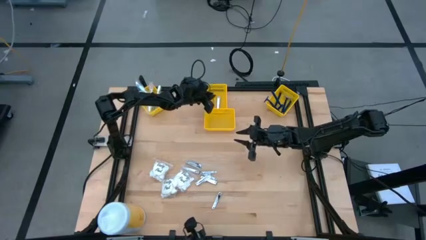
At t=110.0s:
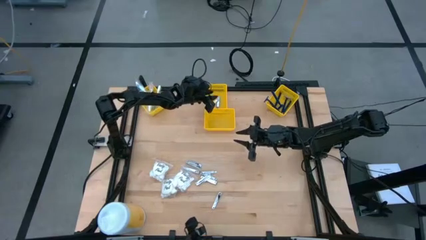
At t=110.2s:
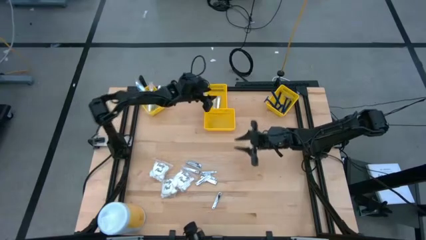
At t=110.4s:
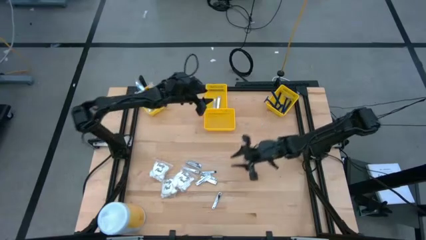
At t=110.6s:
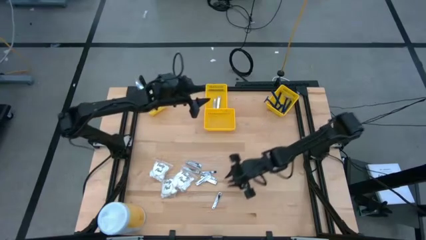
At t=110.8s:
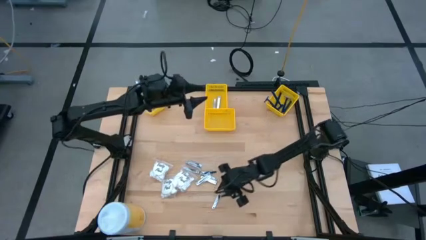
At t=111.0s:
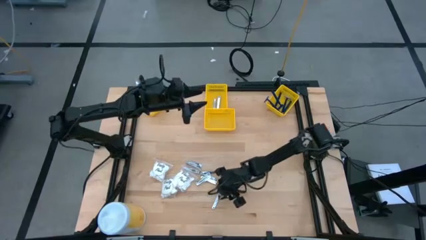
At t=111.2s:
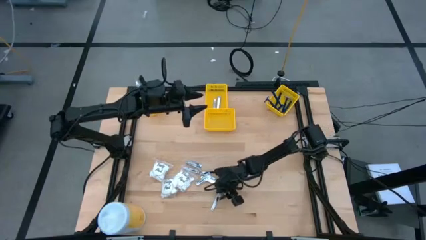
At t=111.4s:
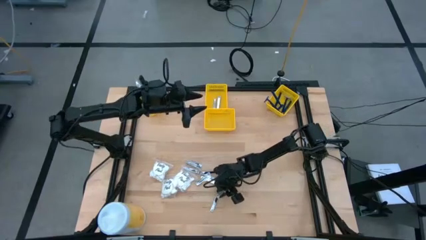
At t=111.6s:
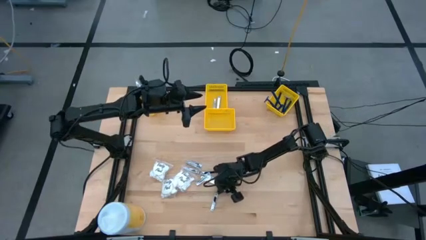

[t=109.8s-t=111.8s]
Task: Pick & Place Travel size toiletries
Put the nail cutter into the top middle yellow bin

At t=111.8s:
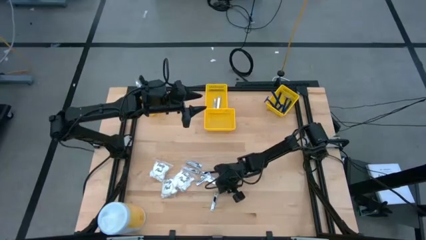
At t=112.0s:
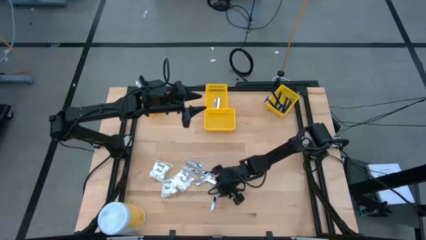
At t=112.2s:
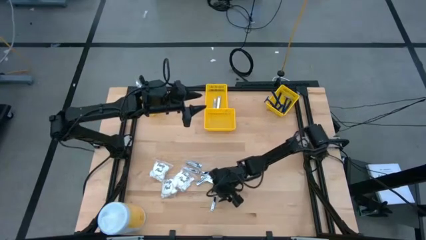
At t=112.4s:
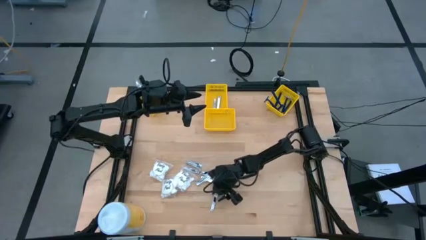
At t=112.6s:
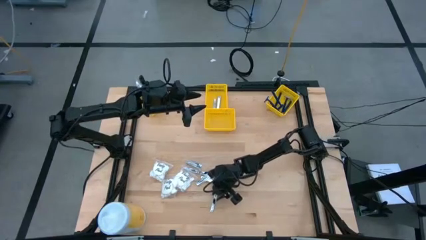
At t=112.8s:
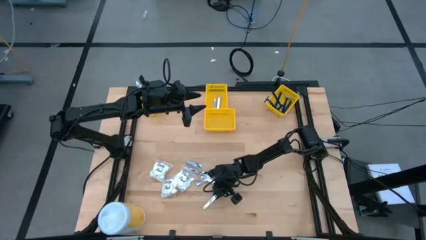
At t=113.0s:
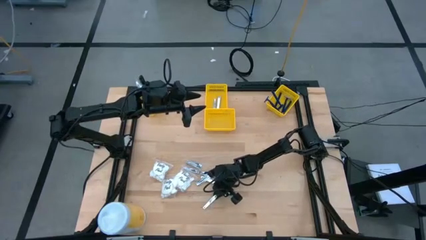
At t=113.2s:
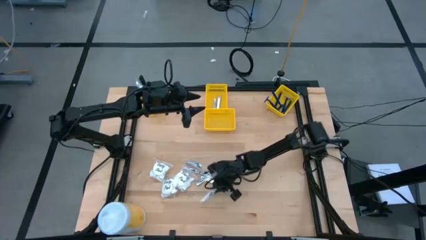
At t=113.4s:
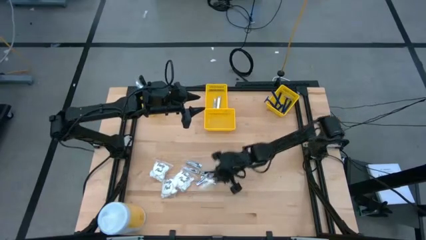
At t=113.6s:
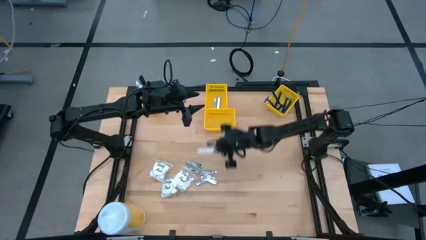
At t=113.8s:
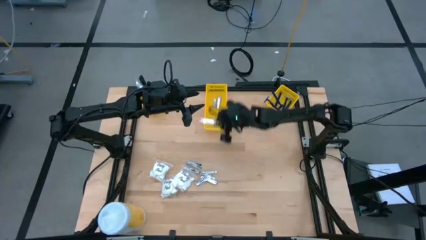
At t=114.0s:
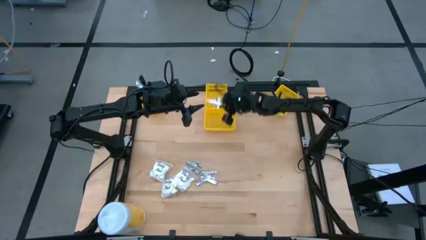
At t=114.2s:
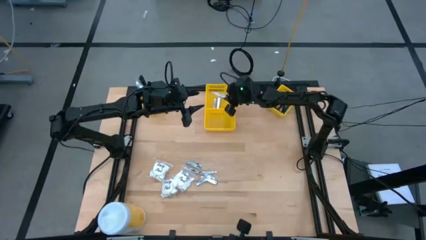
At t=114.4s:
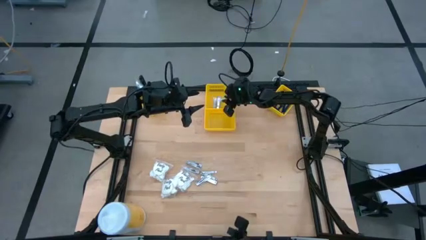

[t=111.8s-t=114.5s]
Put the nail cutter into the top middle yellow bin

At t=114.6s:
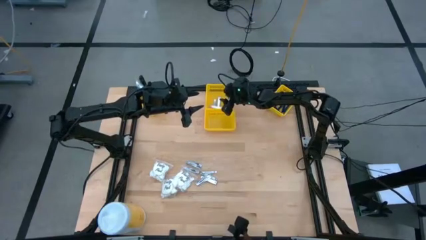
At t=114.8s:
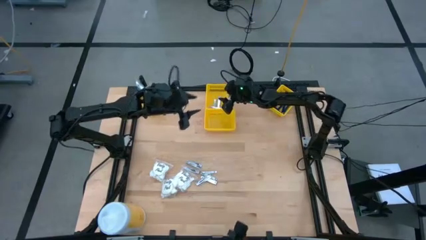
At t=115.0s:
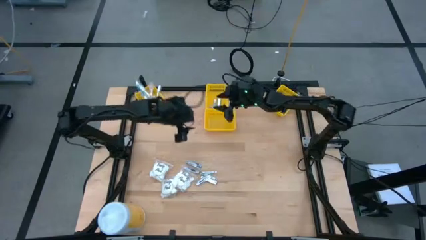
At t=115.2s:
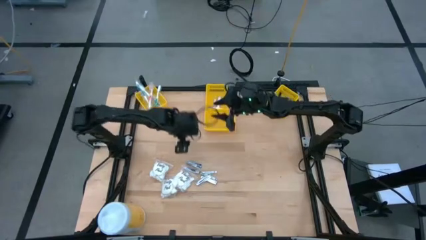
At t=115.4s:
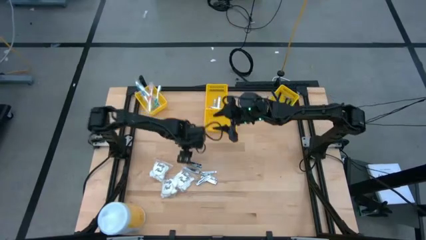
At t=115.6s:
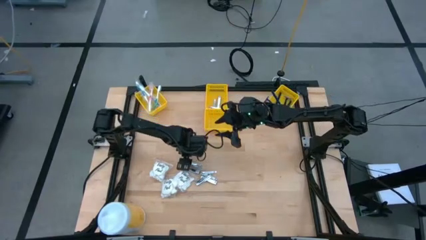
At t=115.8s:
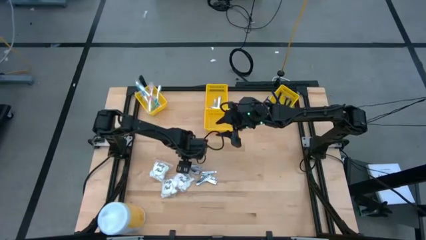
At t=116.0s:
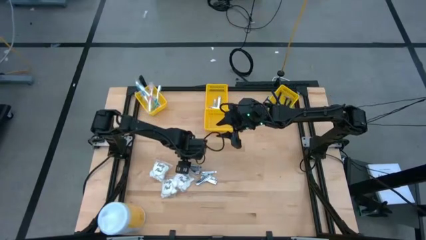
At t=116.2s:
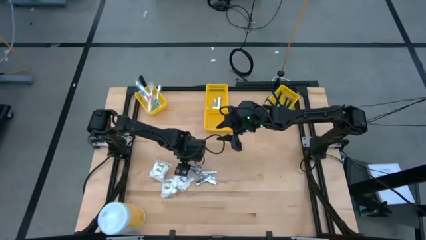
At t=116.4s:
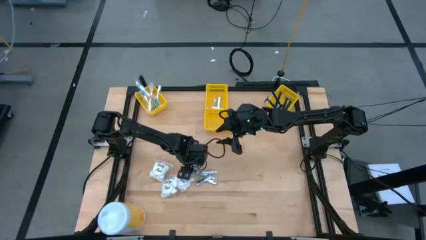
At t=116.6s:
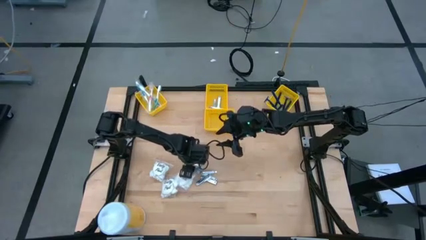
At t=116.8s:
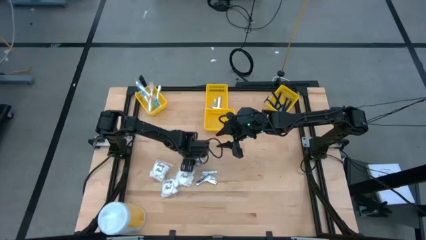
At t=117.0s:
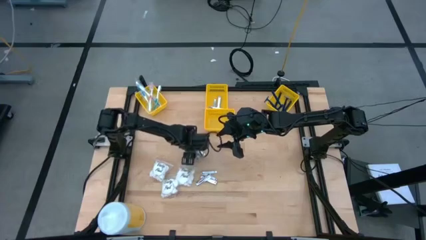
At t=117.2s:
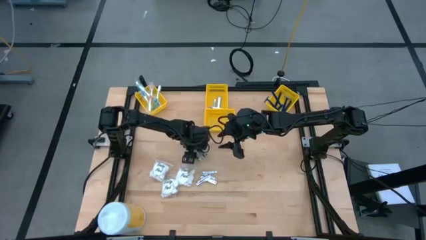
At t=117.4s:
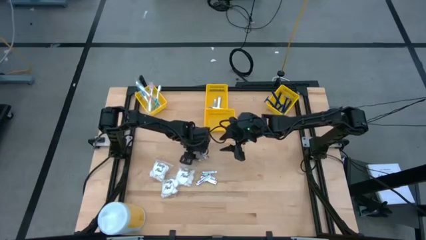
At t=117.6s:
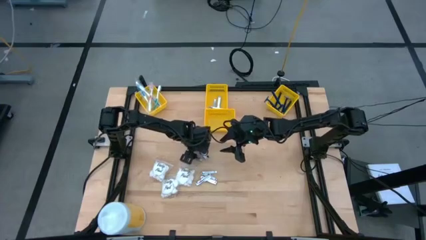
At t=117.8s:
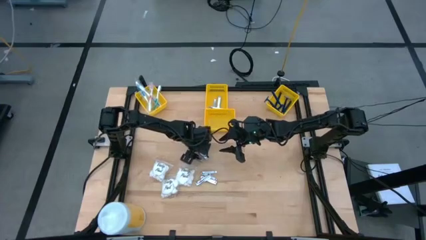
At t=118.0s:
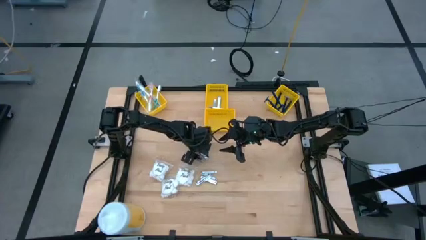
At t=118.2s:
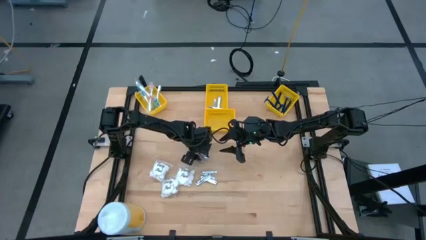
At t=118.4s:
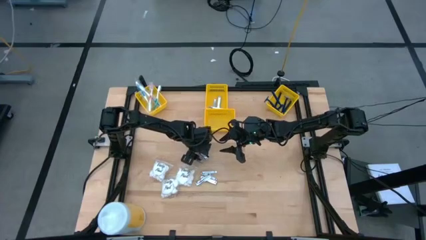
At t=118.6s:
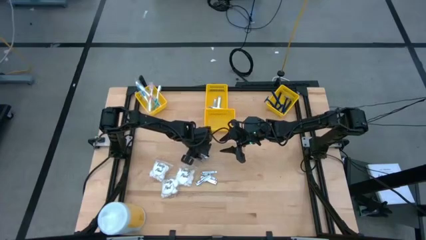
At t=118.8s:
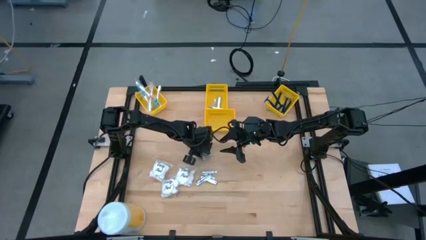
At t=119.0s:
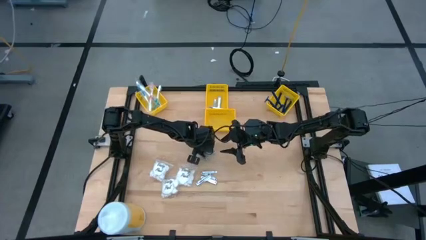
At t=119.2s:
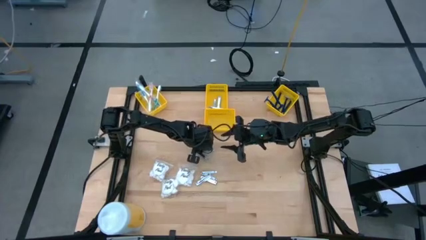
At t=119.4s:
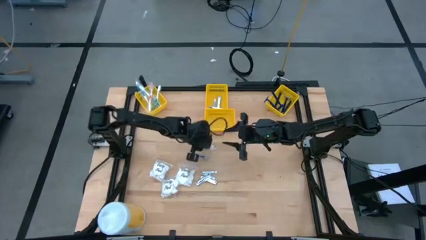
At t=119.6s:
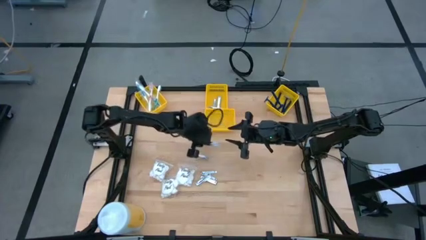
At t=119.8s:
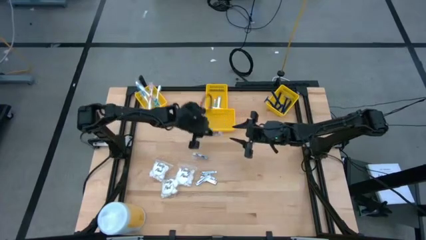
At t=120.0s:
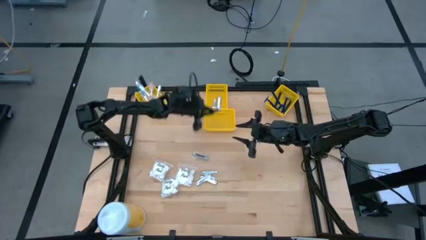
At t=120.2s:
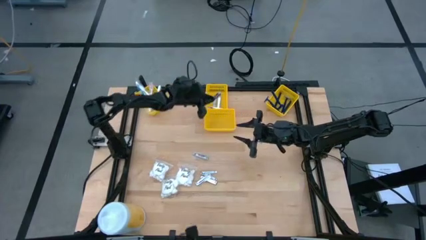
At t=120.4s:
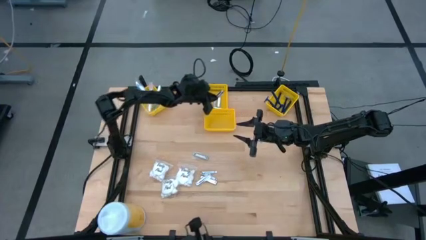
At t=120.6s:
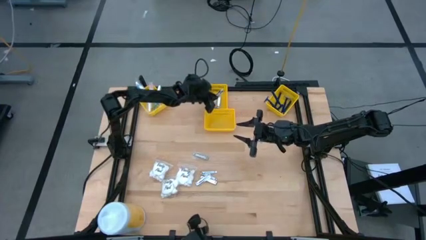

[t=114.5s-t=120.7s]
Put the nail cutter into the top middle yellow bin

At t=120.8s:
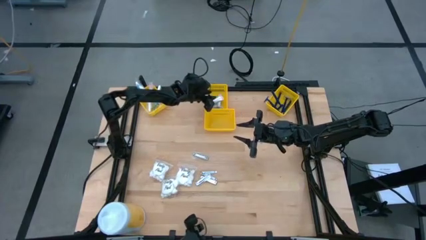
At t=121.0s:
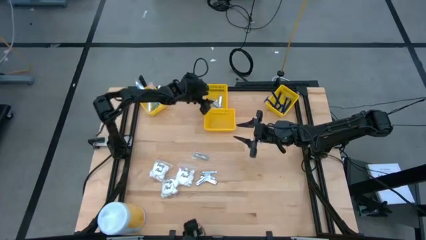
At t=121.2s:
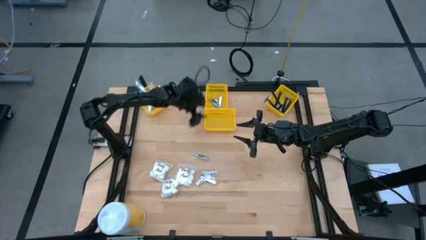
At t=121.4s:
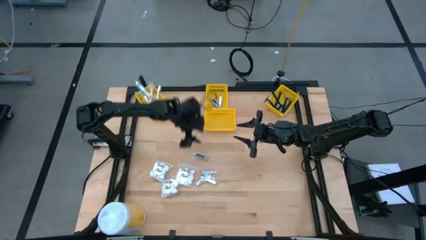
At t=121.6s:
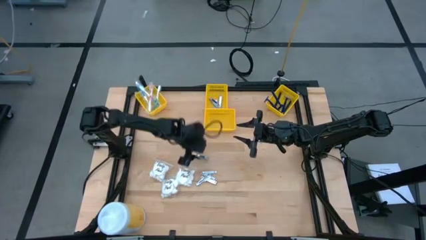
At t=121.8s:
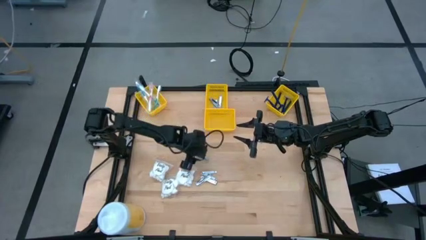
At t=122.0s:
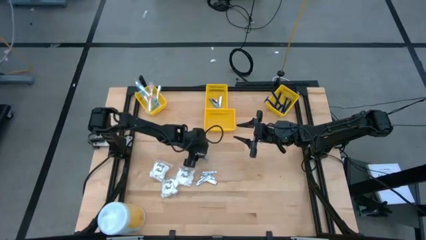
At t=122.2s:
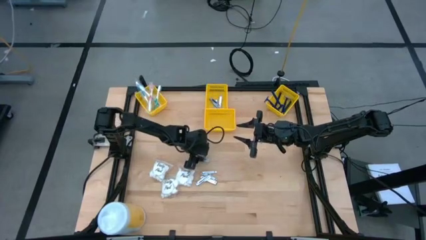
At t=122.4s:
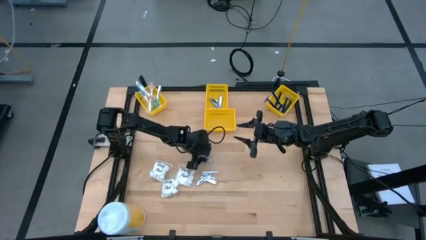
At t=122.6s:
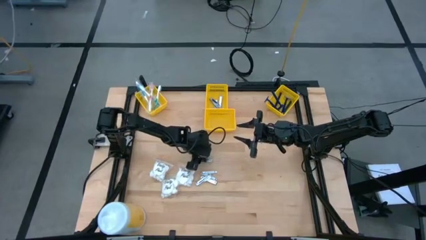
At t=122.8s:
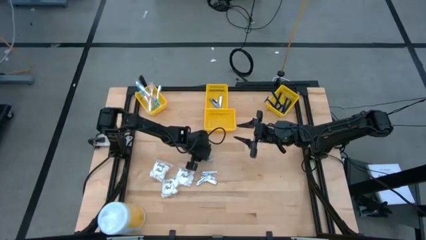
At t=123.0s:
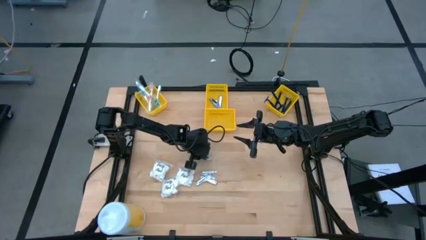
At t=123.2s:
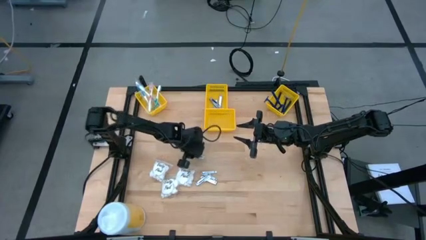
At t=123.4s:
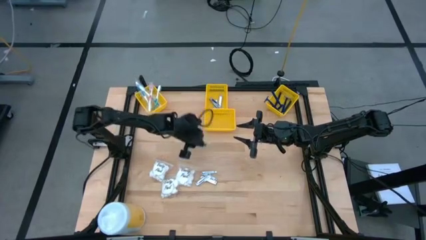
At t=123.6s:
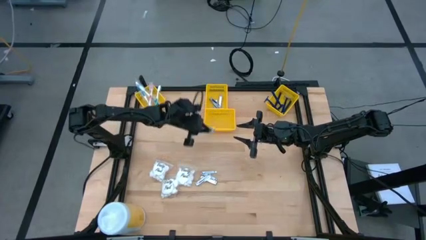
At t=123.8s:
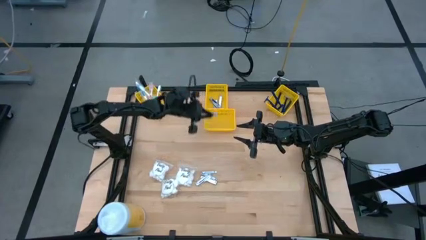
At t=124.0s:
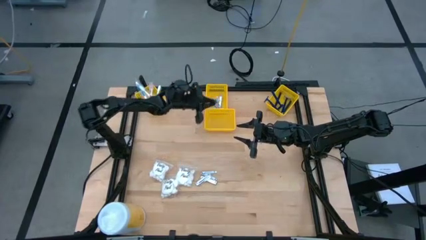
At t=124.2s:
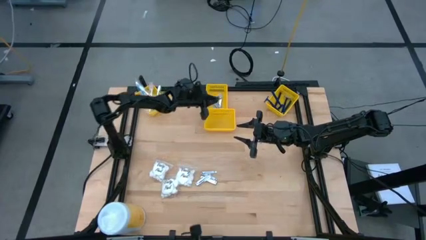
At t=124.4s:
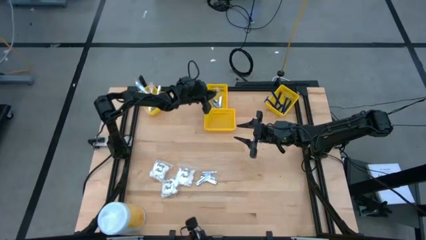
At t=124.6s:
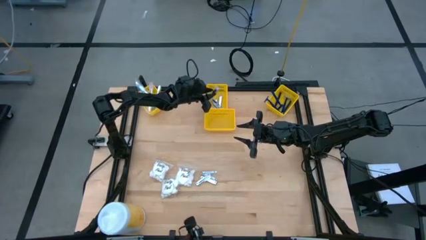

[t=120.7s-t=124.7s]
Put the nail cutter into the top middle yellow bin

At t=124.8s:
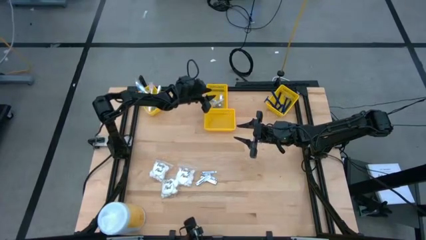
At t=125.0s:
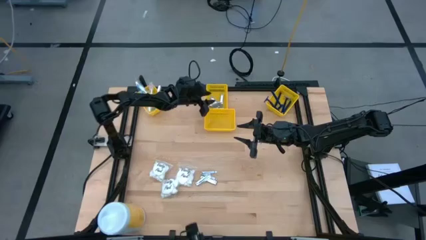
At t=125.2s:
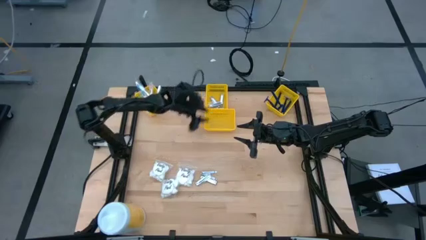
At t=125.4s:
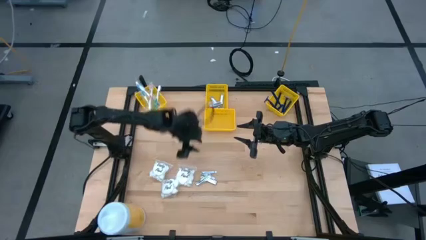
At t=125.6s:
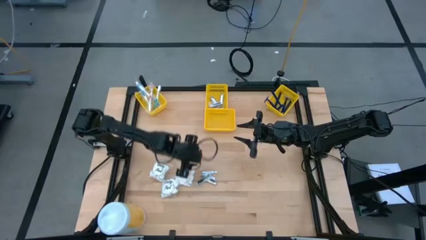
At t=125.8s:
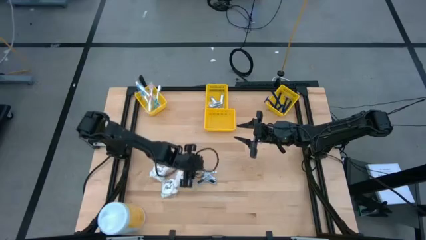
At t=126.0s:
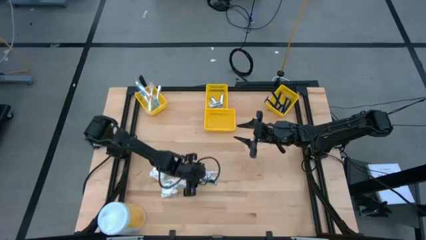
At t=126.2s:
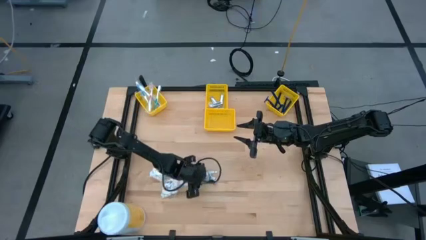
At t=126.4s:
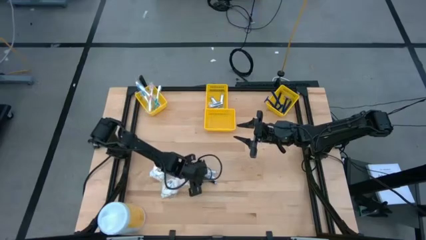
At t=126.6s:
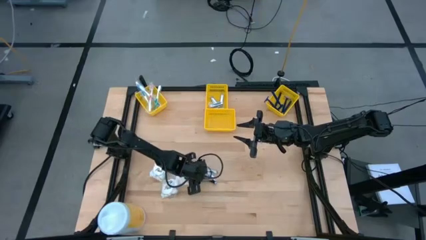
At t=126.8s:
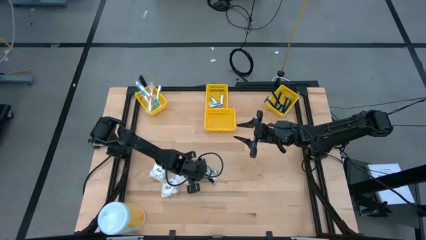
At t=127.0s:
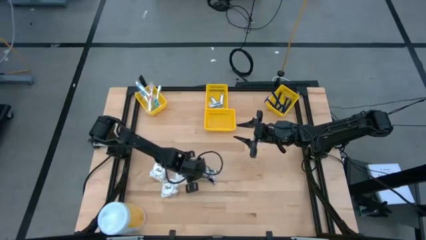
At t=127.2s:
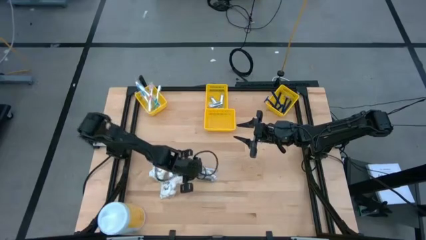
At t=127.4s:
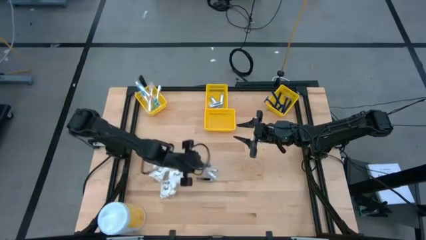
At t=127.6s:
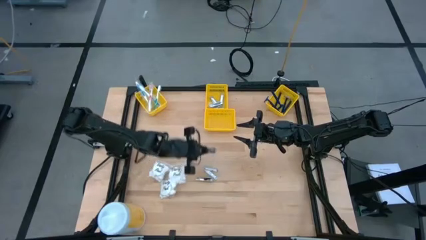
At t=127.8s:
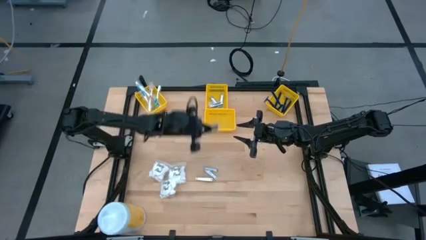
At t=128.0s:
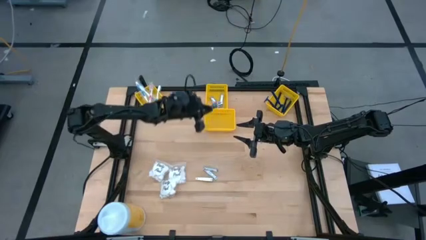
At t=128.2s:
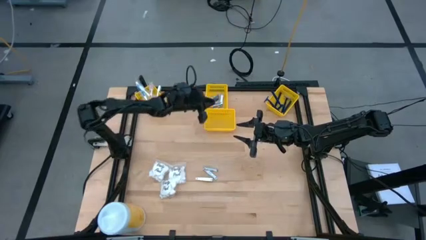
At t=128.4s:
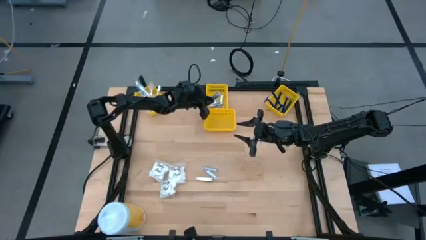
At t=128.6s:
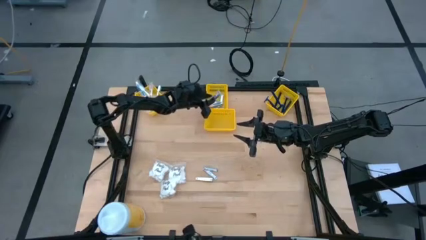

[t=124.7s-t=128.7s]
Put the nail cutter into the top middle yellow bin
